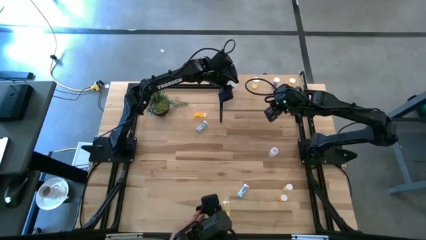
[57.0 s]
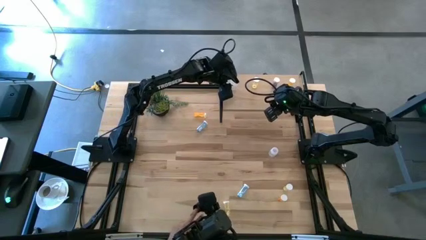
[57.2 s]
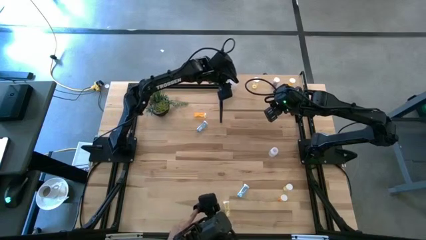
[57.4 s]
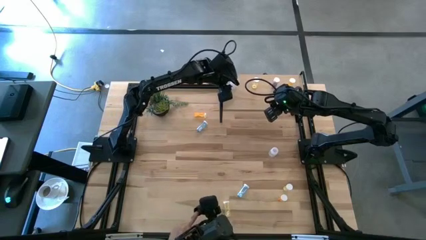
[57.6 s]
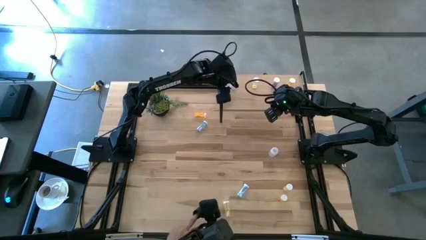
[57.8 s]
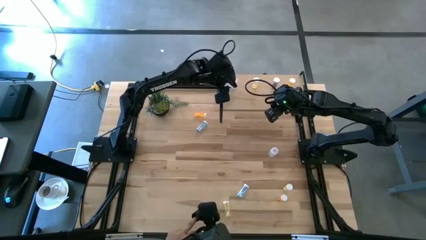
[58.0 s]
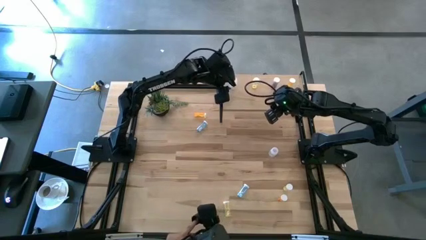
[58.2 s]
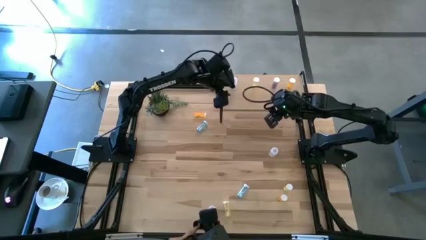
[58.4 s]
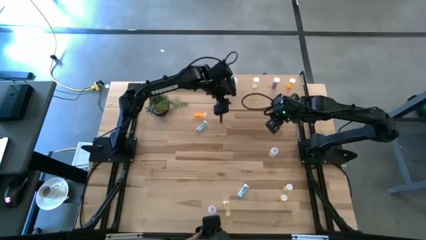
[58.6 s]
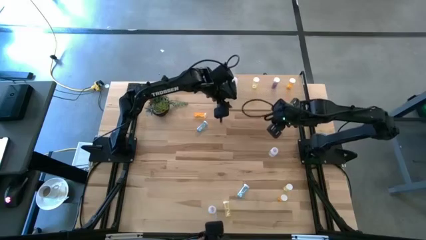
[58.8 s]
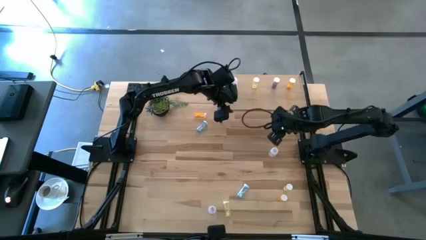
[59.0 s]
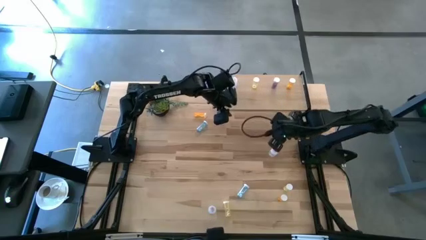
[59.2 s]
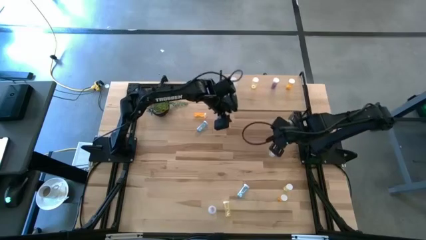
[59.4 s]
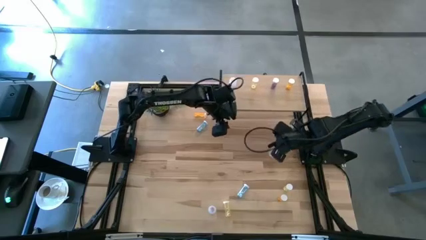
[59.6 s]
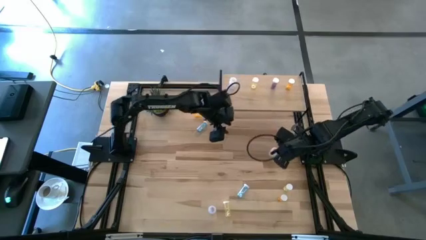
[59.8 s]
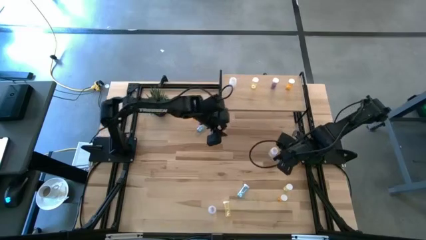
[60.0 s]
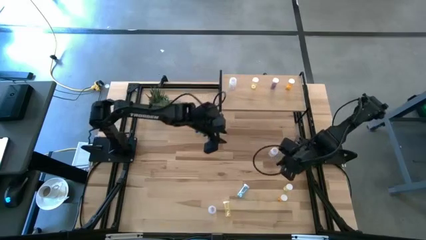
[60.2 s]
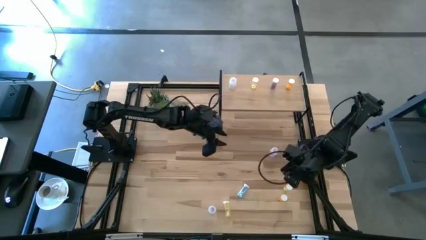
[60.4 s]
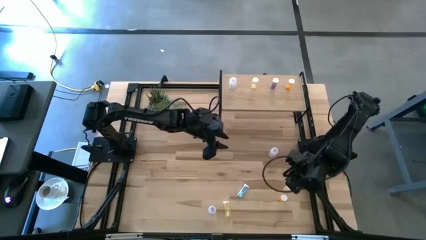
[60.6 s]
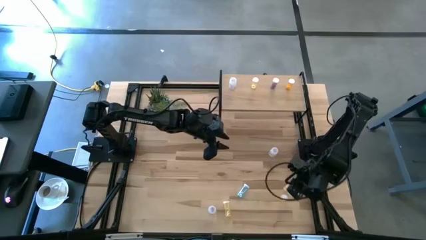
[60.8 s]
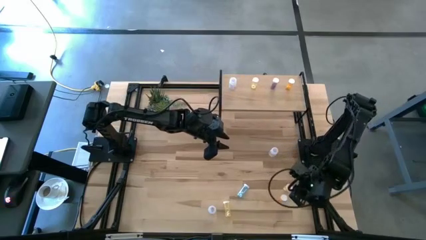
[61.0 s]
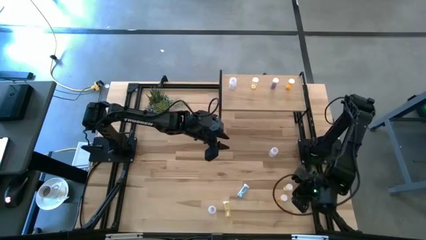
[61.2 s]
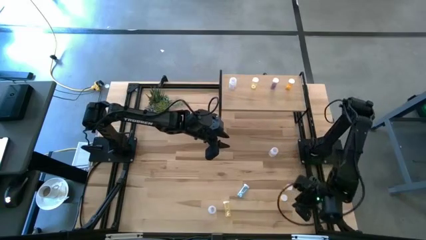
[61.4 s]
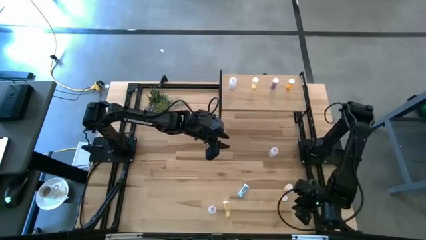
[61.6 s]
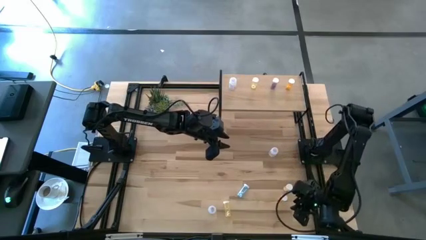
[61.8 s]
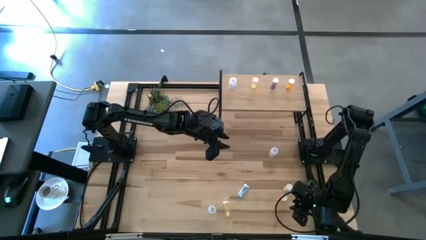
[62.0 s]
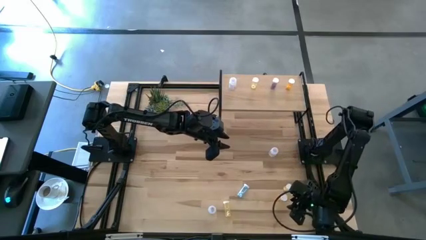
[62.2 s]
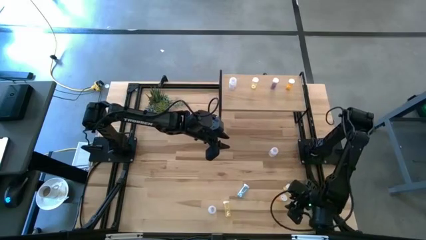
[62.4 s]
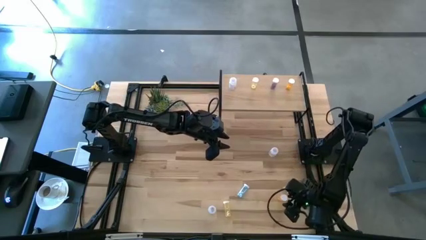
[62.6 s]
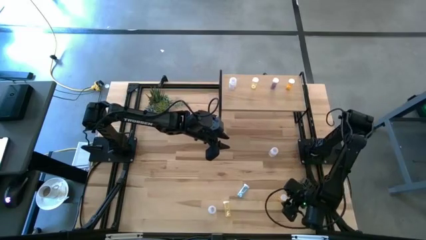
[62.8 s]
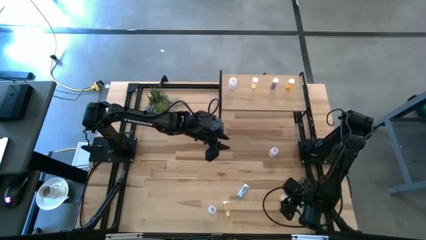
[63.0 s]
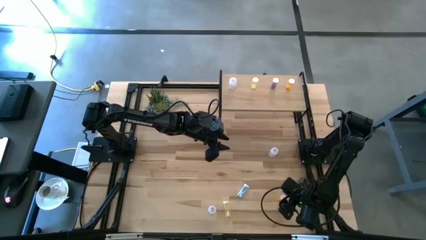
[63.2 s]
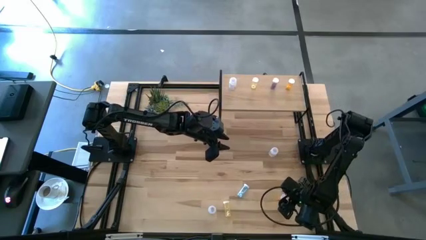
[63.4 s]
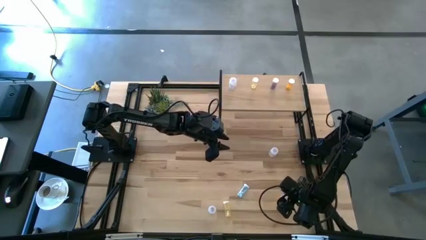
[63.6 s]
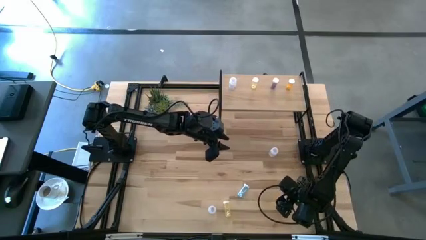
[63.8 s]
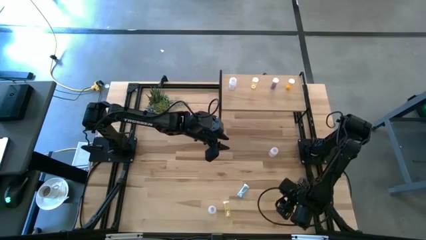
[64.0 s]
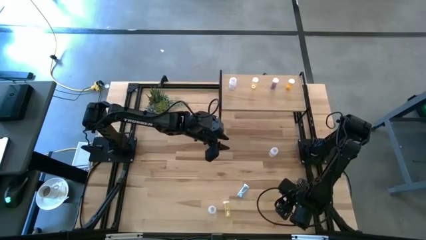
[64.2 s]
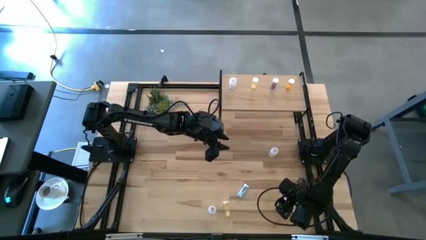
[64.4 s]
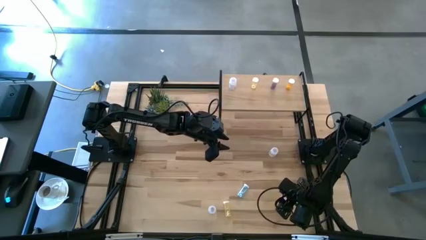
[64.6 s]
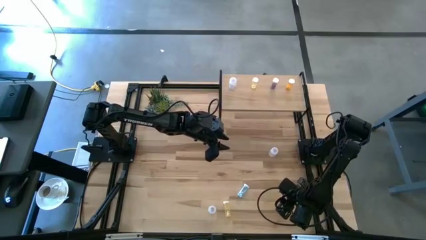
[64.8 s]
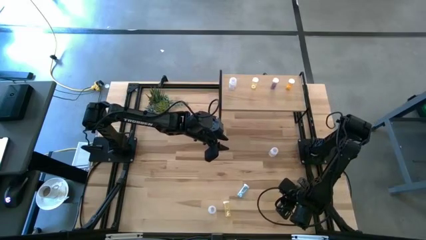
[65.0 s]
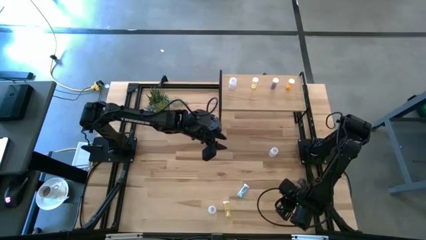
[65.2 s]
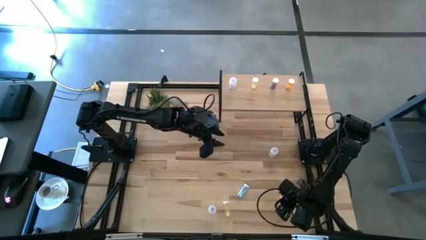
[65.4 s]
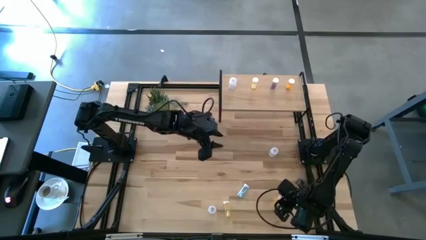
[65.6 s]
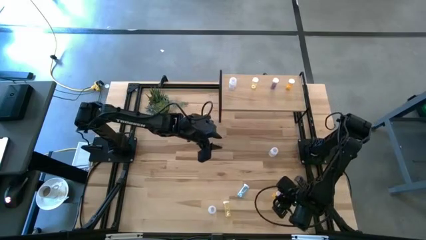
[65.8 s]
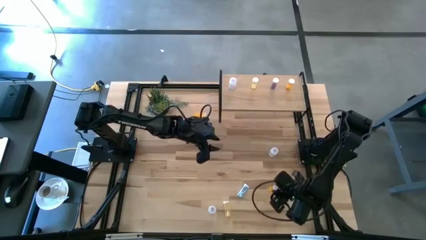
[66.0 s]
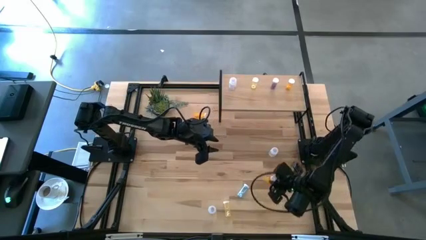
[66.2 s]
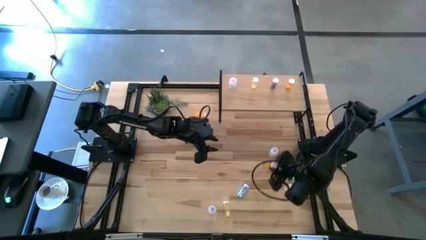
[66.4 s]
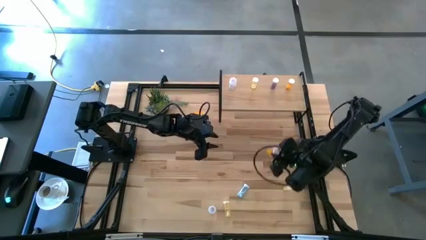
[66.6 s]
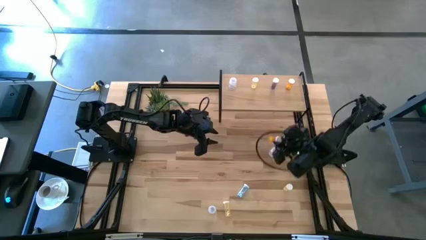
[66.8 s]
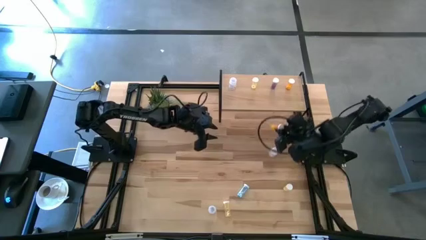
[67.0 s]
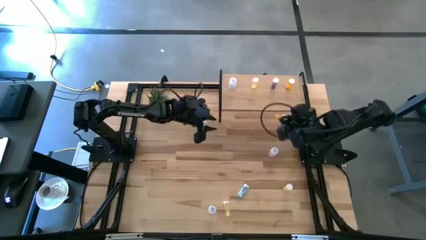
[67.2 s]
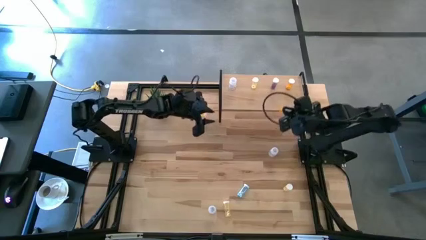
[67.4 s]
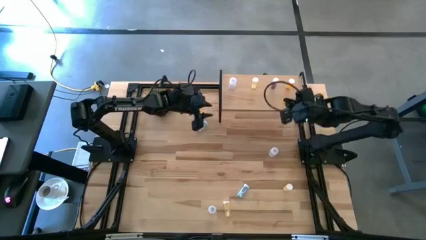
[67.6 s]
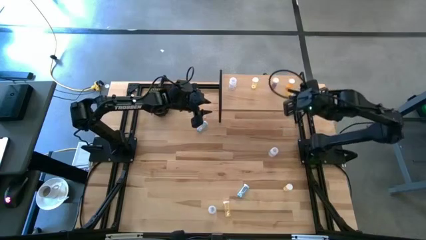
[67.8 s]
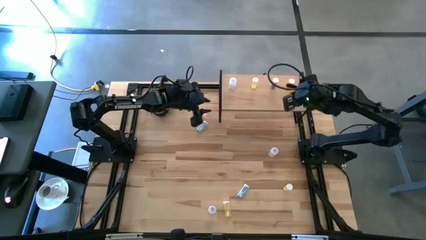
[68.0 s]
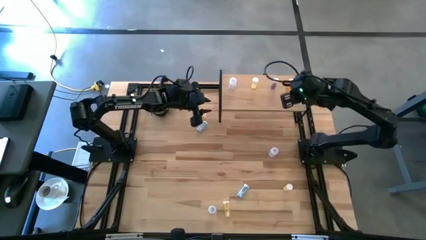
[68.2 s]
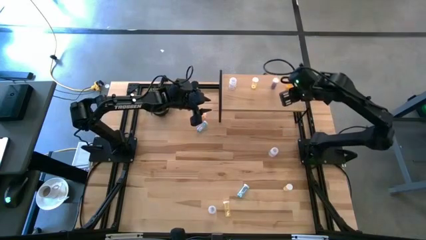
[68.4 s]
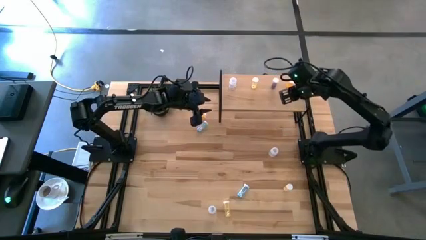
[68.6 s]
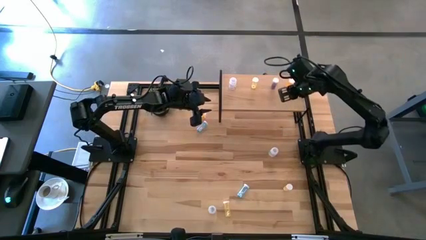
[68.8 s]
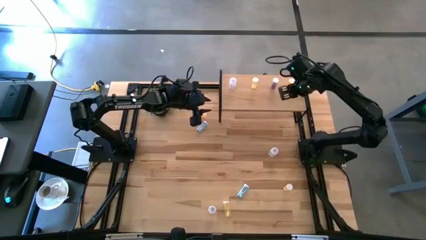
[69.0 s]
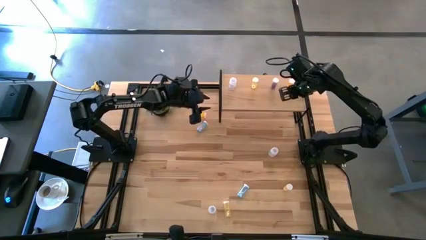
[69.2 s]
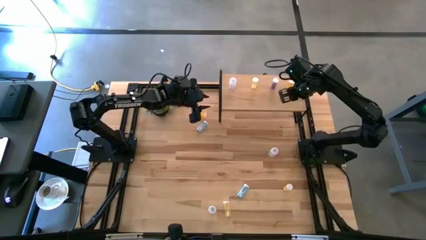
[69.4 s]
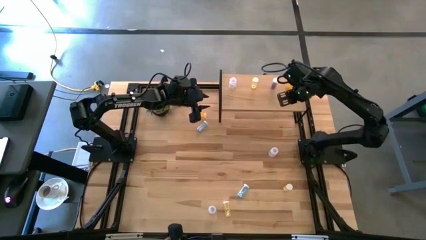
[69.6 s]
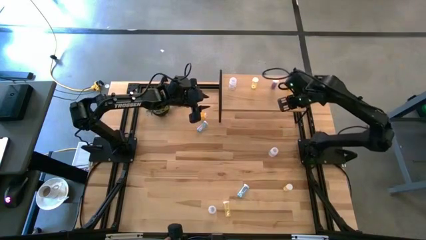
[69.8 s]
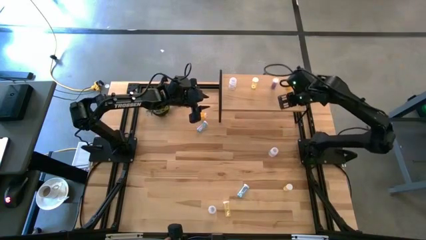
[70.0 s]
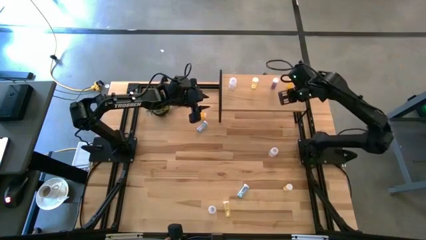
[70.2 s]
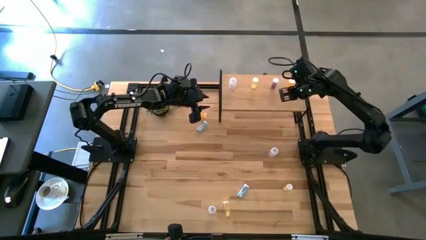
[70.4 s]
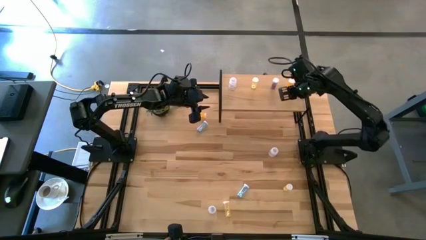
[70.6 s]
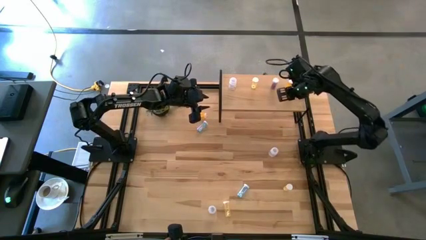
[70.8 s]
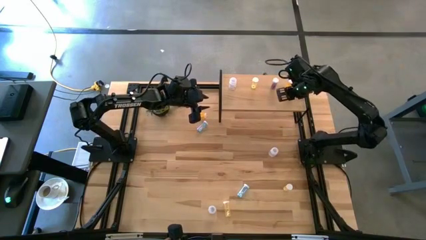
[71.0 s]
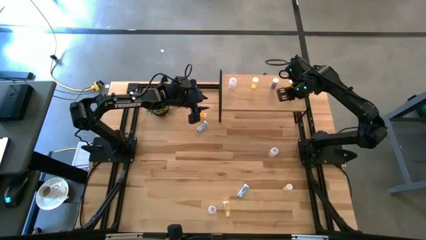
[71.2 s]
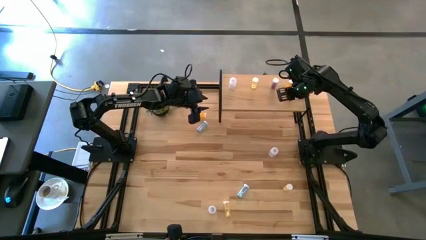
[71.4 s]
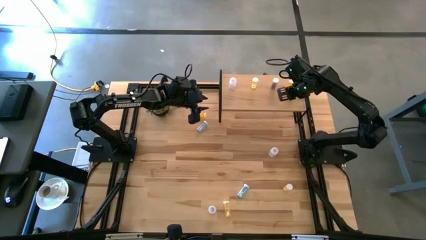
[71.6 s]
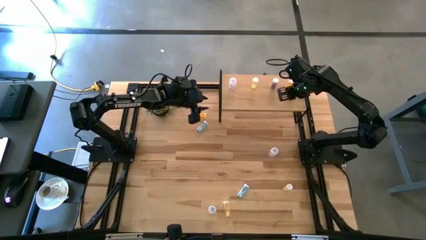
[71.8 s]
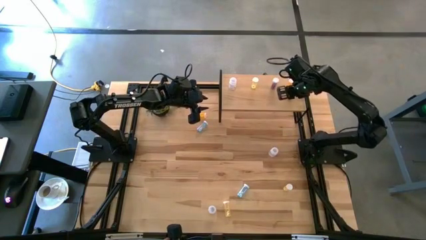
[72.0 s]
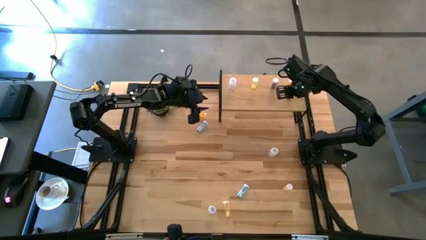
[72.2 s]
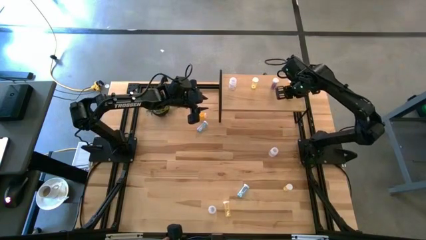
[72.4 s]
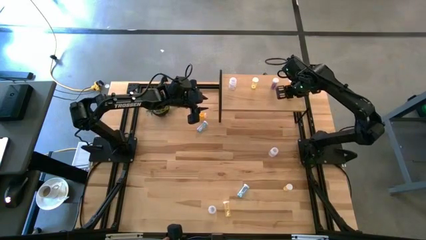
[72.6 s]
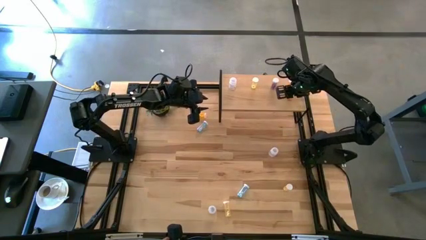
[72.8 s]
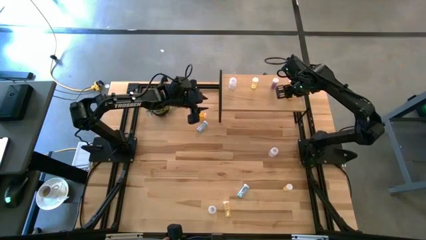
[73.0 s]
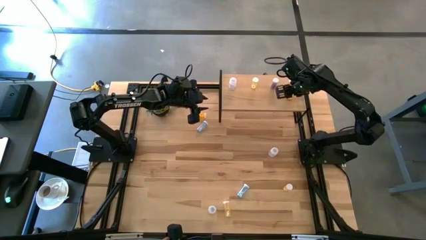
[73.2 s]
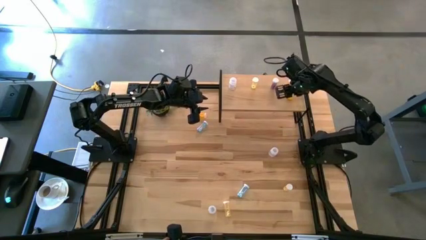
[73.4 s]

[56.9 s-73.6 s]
Task: Pick and place medicine bottles onto shelf by color
Put the bottom orange pill bottle aligned with the other orange pill bottle on the shelf

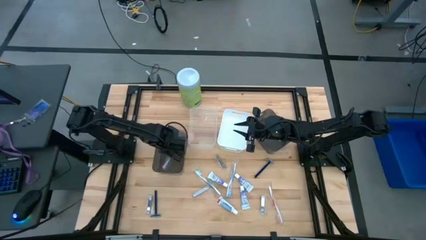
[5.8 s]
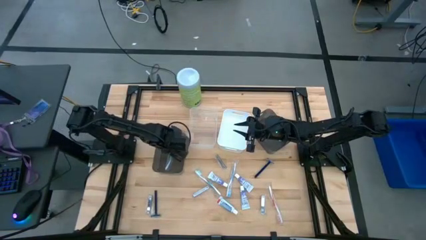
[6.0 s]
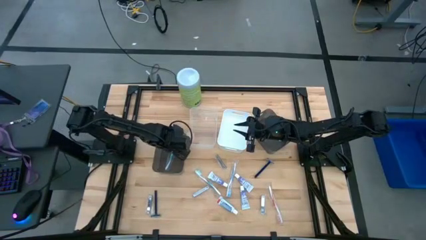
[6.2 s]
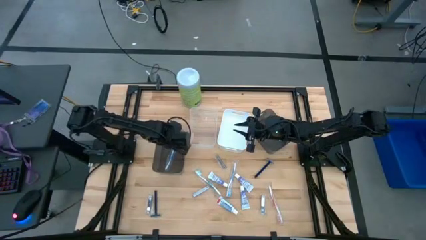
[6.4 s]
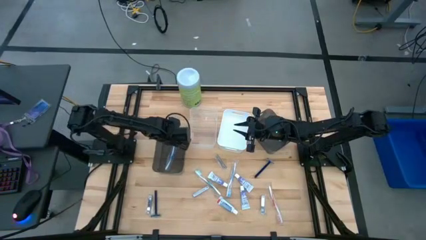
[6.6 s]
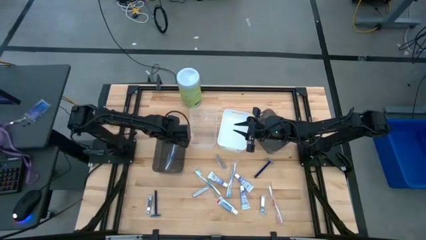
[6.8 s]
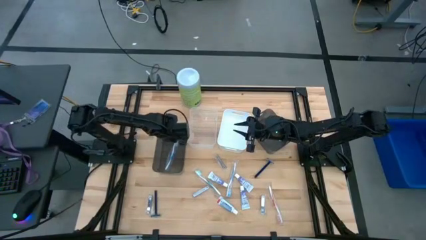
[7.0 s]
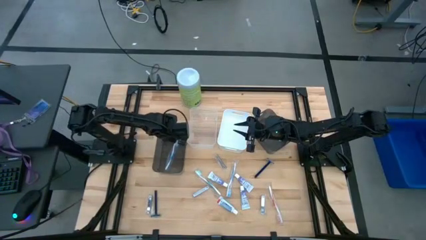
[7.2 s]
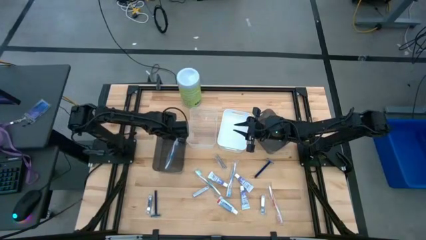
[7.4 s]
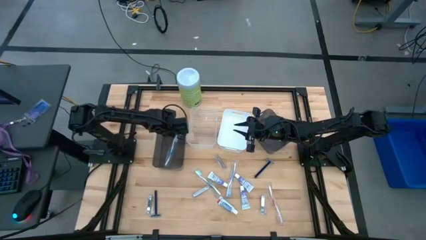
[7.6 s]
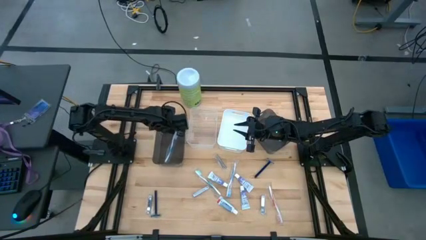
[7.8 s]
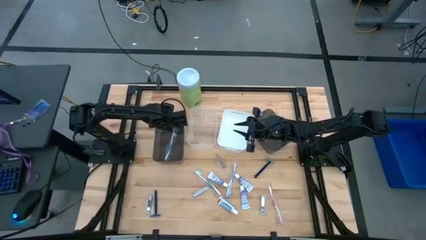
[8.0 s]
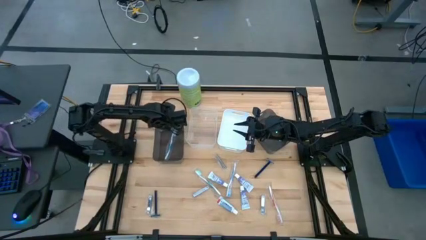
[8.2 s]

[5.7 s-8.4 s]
Task: Pick & Place Travel size toiletries
Adjust the left black bin
